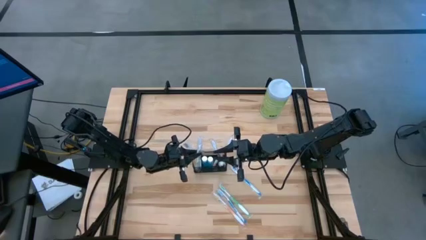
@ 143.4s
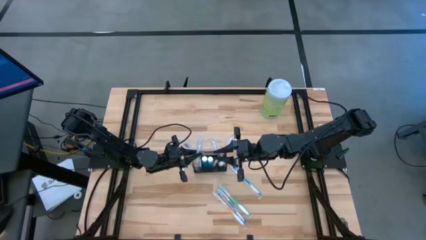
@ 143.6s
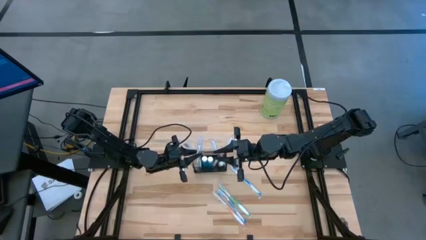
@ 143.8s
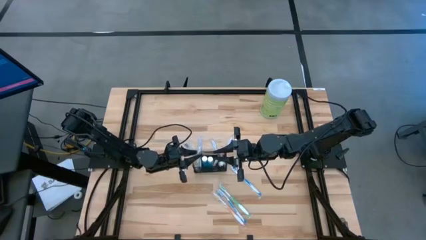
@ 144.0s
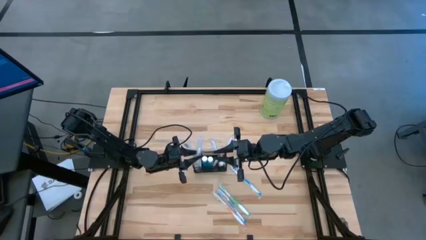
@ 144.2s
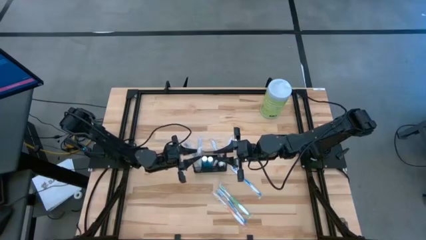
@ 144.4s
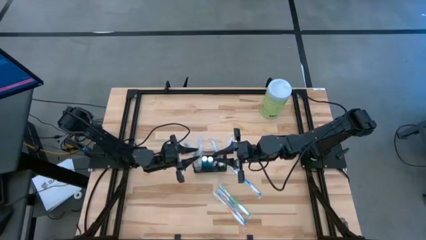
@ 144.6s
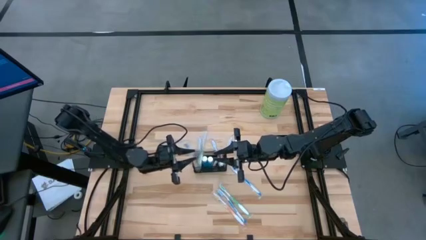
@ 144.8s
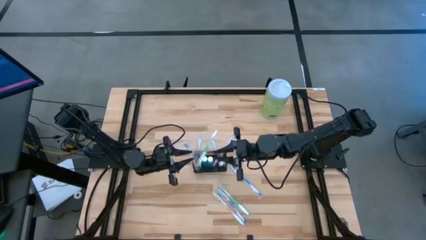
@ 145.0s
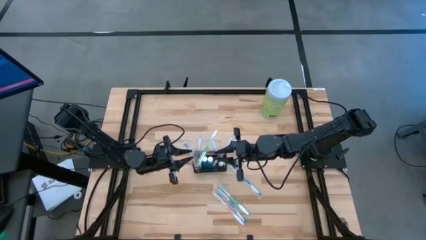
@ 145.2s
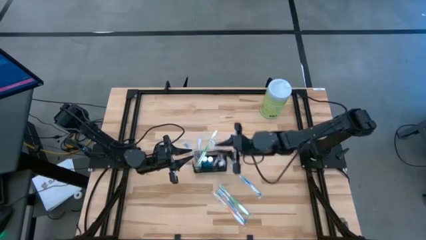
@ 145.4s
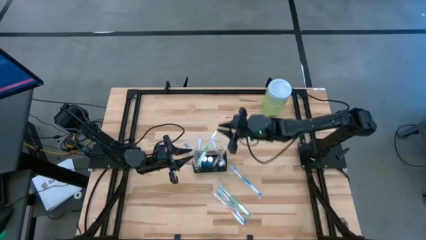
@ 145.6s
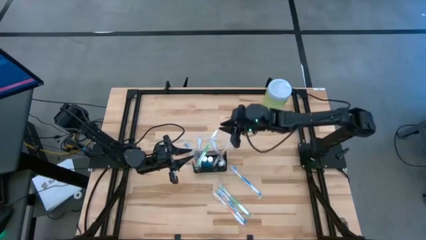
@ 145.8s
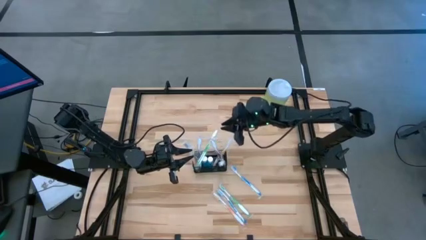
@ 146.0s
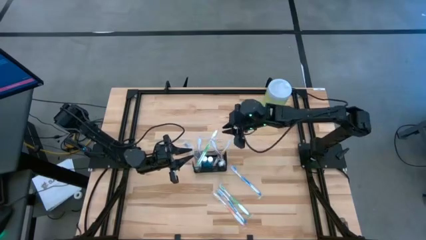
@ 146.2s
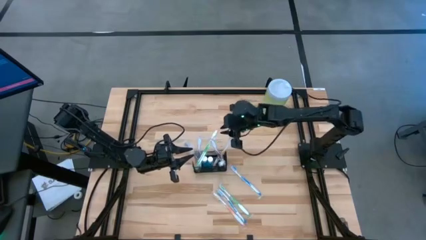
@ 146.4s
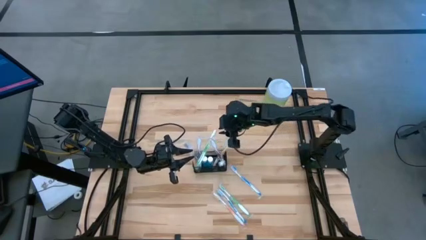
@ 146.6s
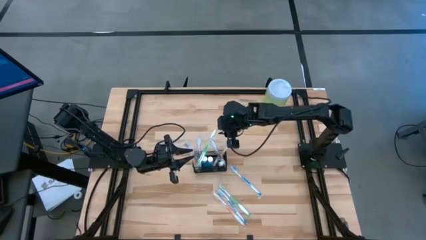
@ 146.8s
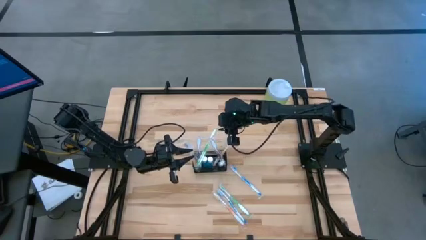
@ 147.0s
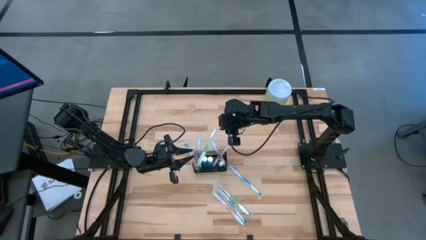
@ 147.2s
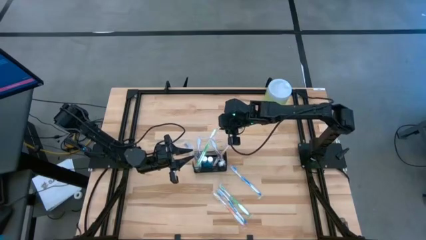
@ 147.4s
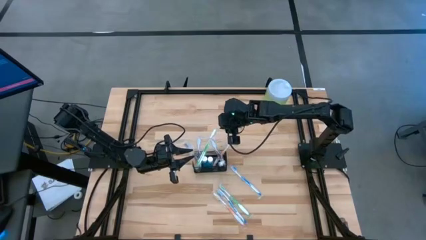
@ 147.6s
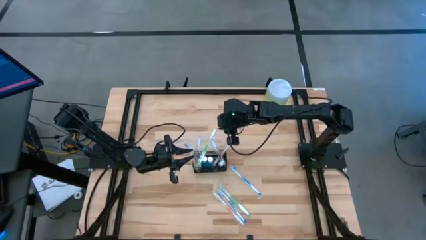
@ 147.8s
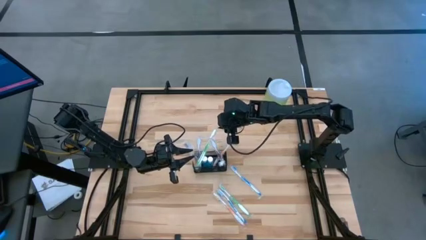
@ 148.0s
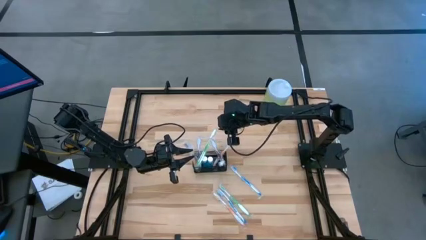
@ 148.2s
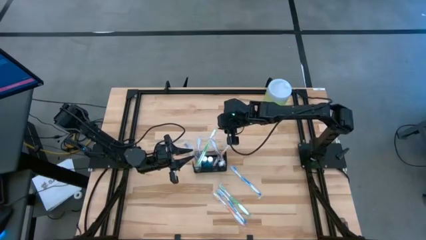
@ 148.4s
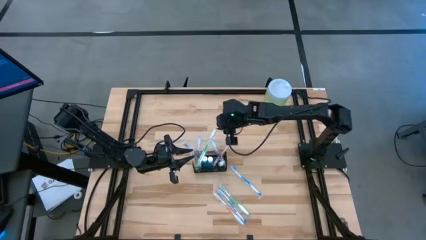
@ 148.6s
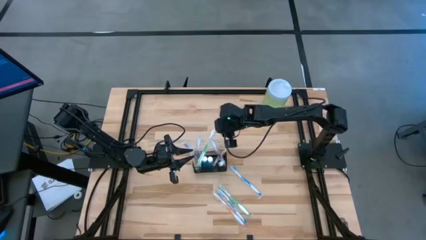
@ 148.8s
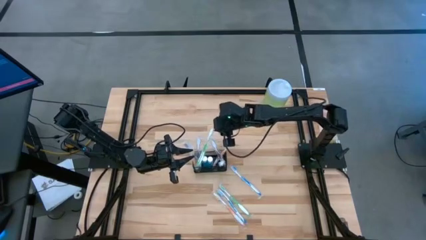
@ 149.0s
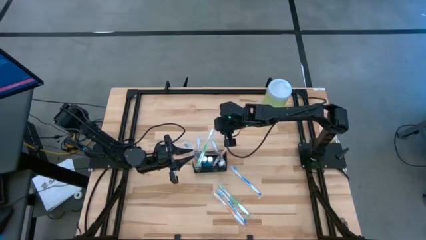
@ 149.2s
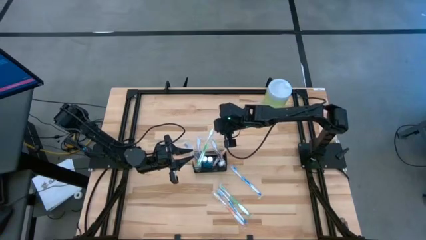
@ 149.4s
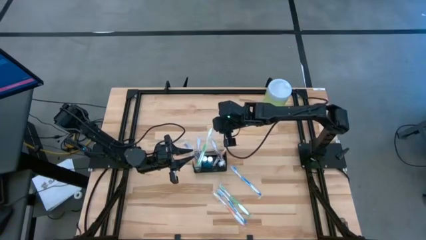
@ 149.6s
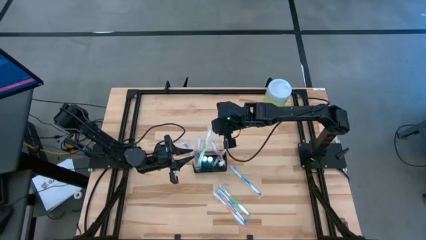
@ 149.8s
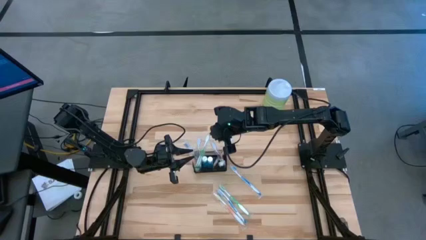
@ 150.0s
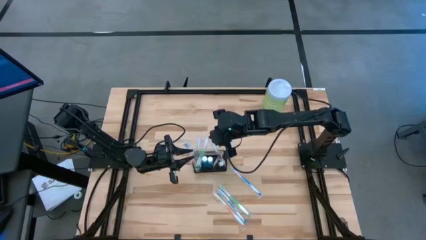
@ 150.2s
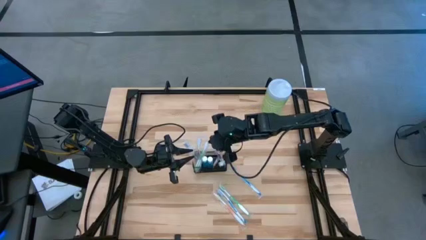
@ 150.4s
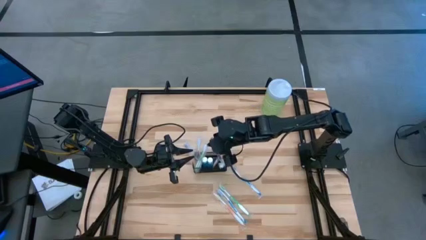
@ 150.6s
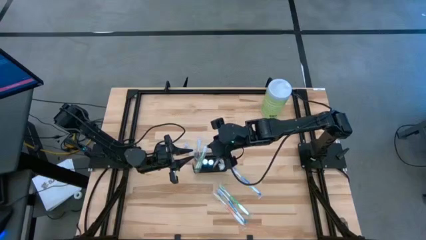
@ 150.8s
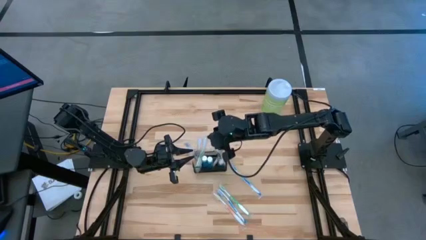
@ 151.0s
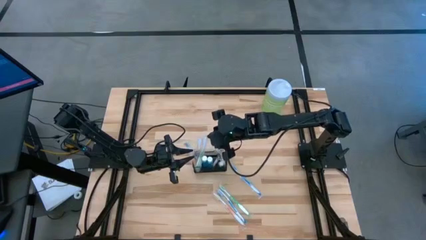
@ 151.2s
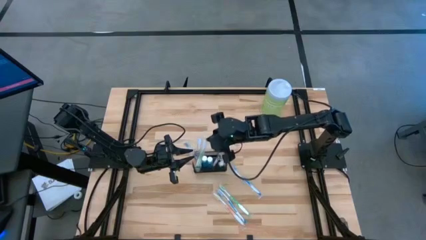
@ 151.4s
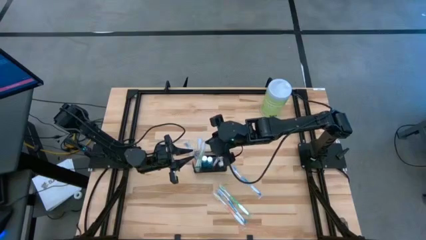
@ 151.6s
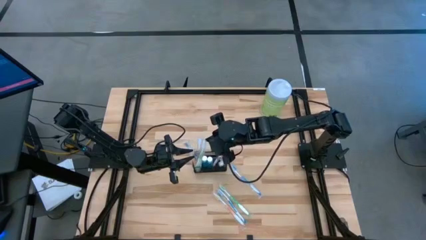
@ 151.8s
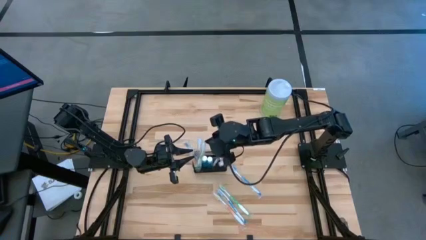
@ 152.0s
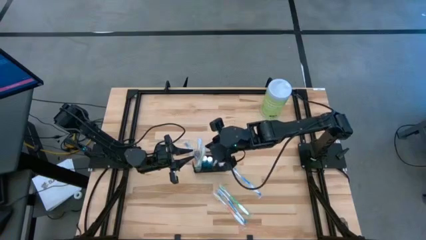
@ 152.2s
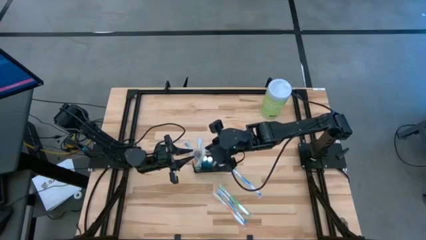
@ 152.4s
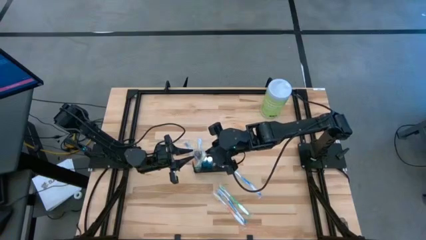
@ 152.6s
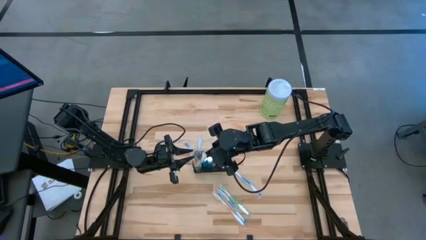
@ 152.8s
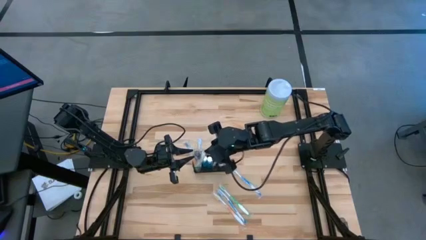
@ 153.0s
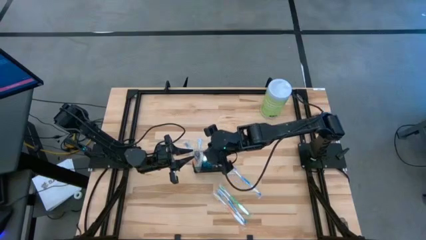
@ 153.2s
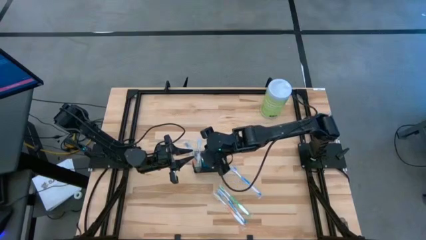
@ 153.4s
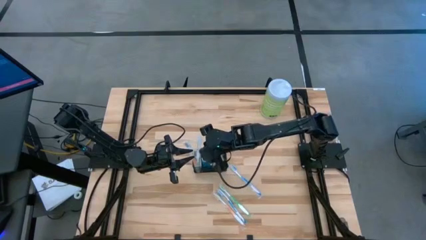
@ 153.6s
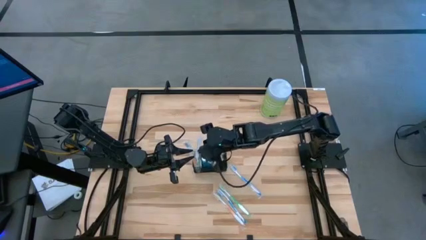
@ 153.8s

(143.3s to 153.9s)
Task: Pick & Place toothbrushing station
Put the green toothbrush into the mesh

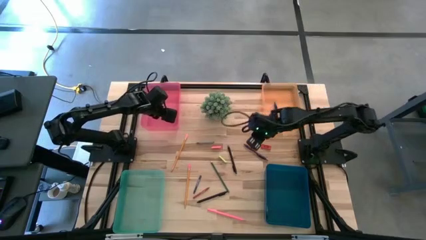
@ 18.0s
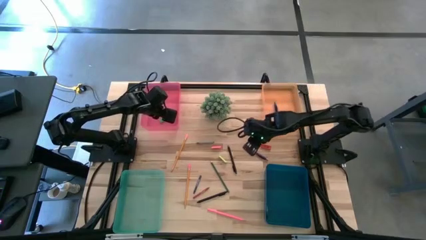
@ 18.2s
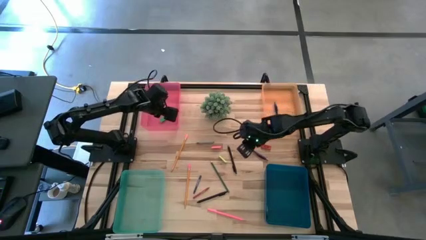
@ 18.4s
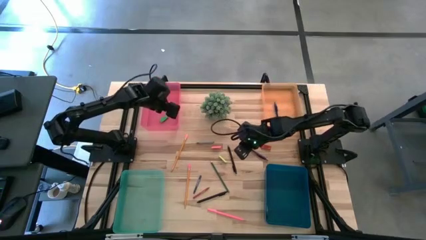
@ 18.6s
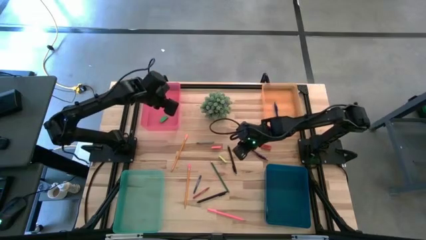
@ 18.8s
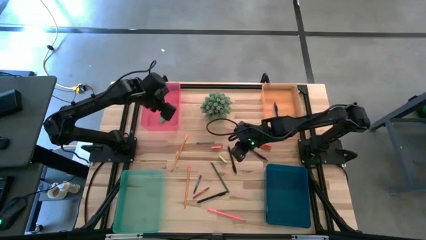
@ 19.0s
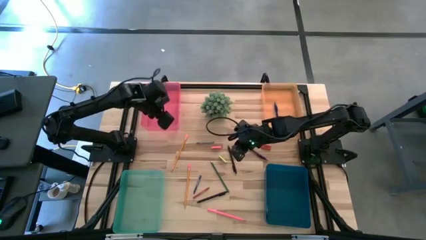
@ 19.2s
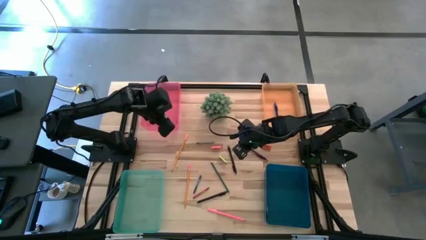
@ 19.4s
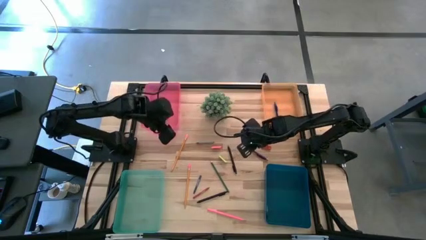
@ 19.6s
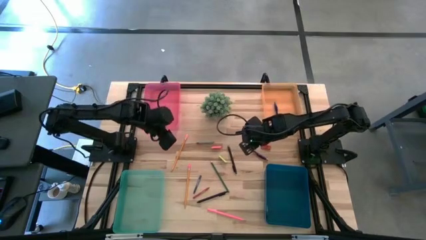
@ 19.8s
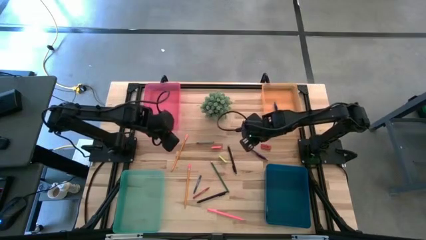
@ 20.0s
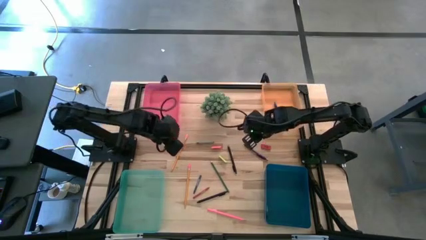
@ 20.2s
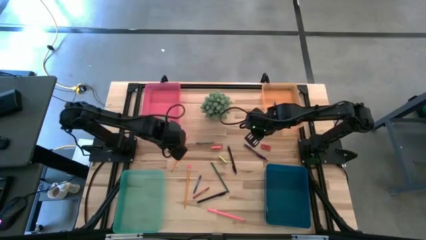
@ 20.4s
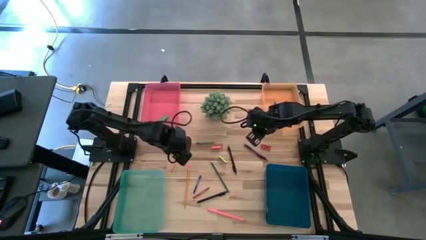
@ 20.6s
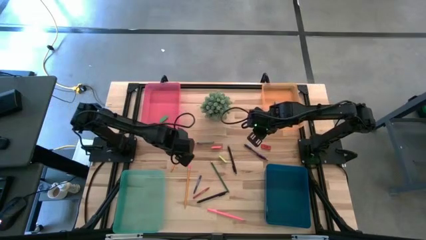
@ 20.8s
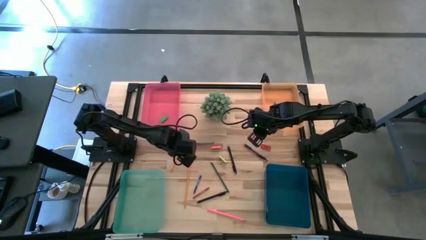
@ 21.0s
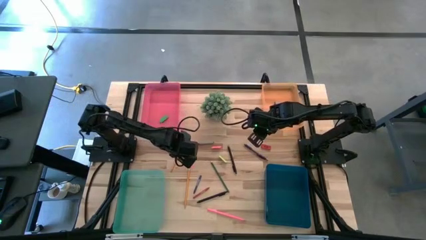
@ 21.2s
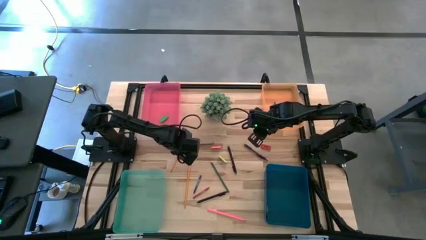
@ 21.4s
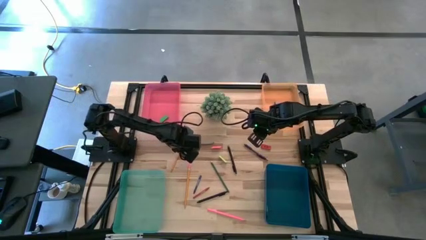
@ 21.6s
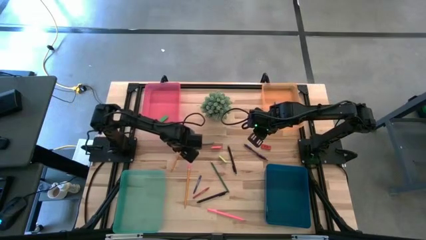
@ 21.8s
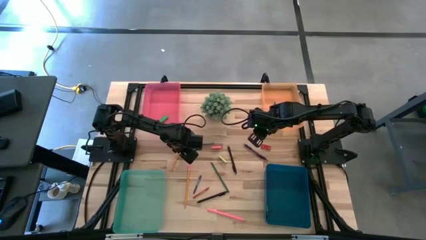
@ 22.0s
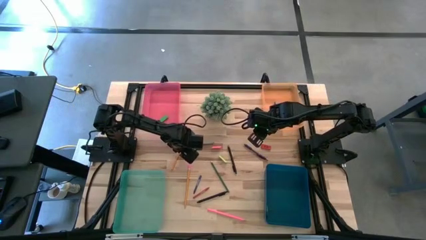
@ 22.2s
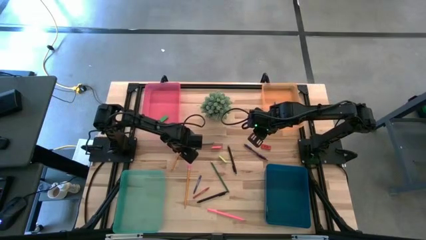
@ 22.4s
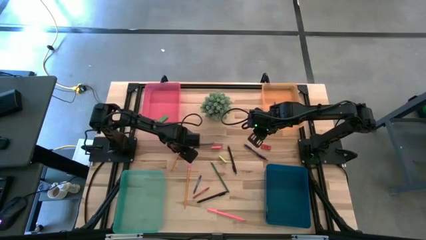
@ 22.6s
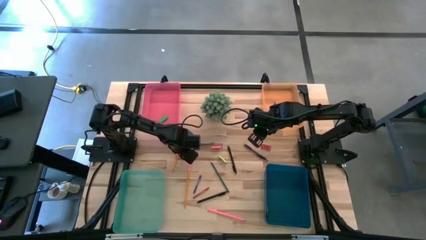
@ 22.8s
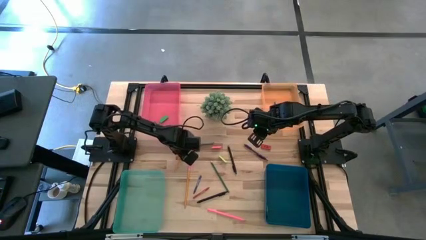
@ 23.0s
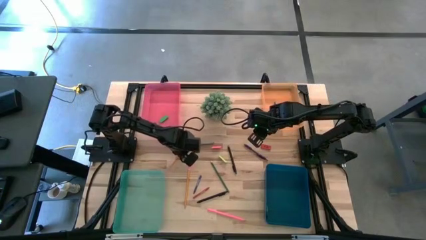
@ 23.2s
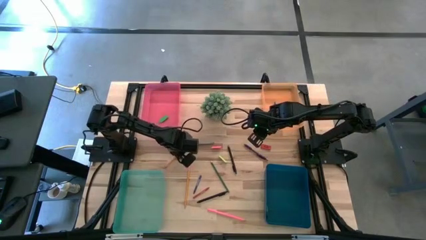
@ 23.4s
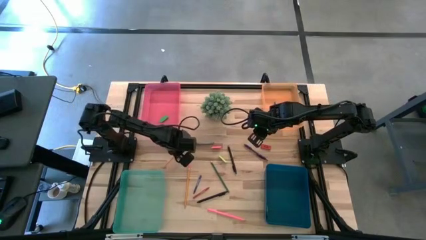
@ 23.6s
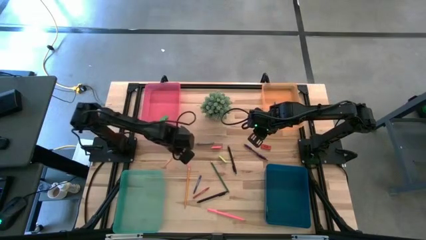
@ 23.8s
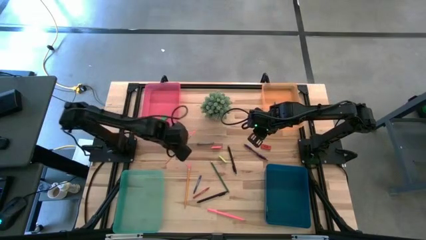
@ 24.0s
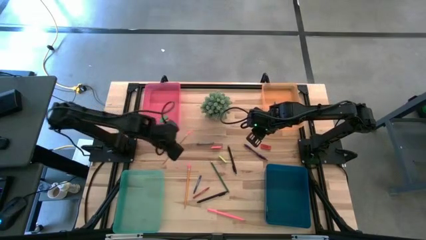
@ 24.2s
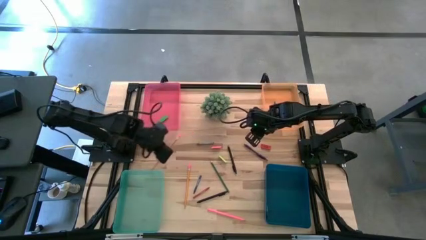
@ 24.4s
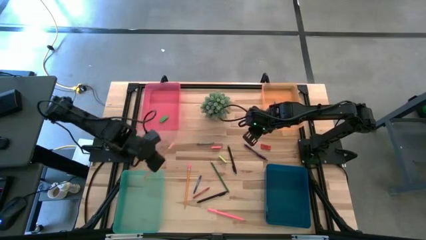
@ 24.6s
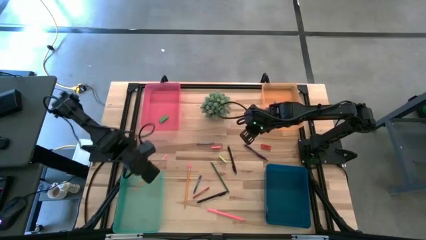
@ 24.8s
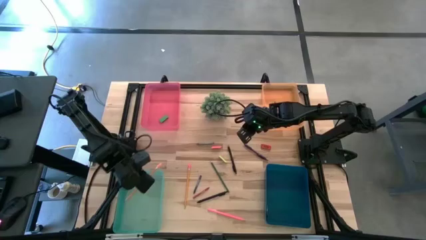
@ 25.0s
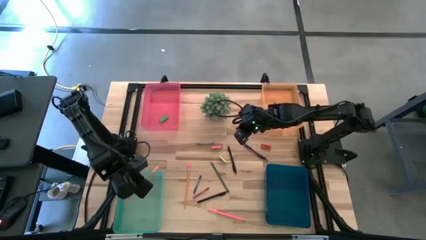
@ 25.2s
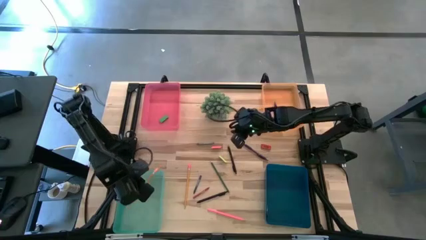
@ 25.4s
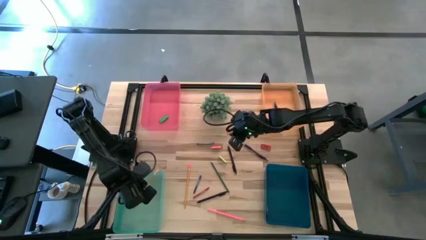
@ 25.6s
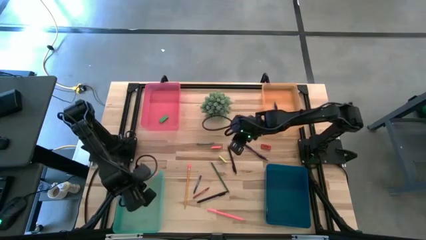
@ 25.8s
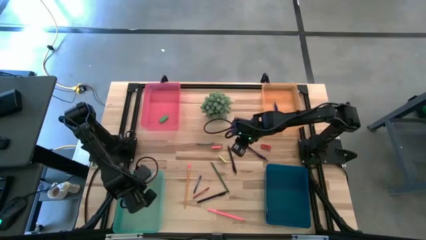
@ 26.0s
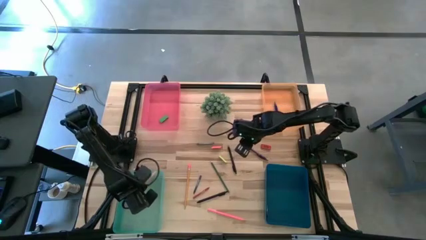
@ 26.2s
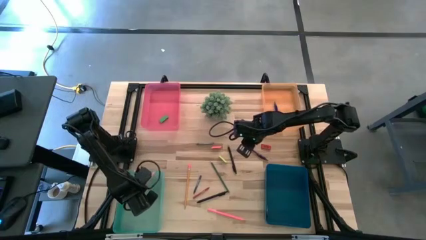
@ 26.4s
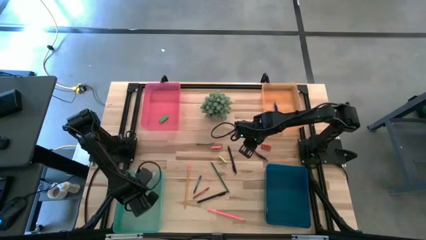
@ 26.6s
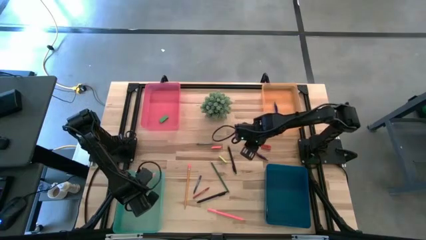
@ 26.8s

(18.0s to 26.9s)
Task: Sort crayons/erasers/pens/pencils in bins
Put the top yellow pencil into the green bin
